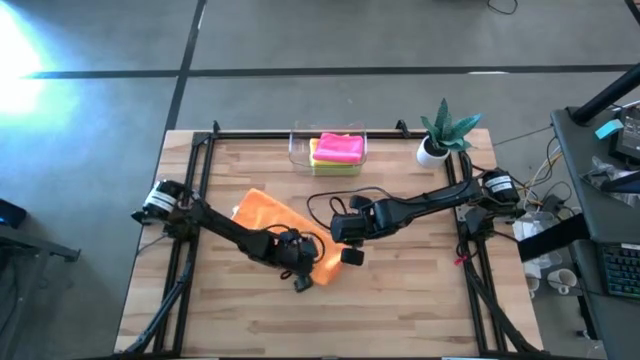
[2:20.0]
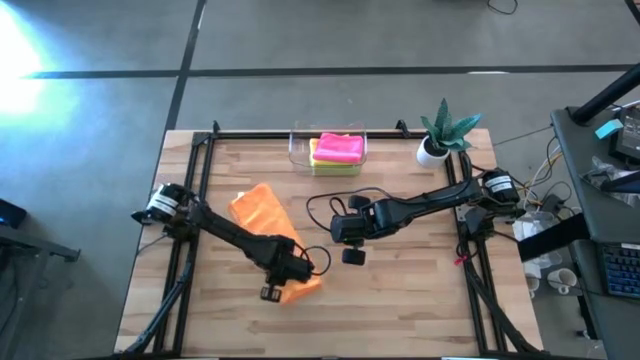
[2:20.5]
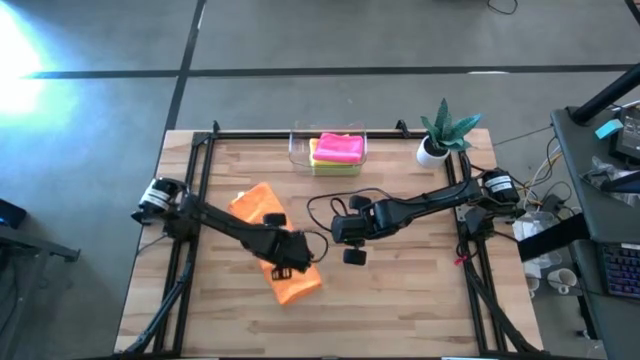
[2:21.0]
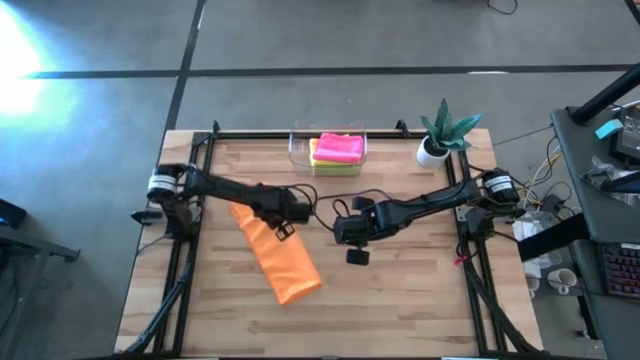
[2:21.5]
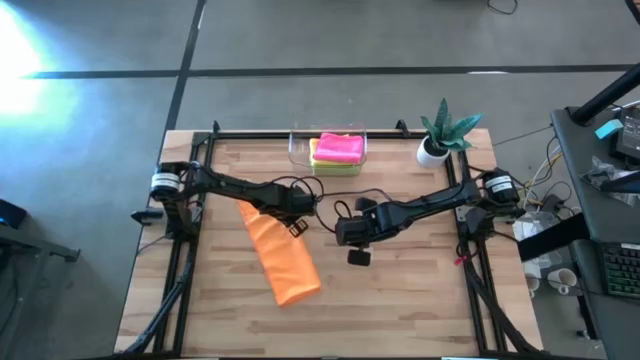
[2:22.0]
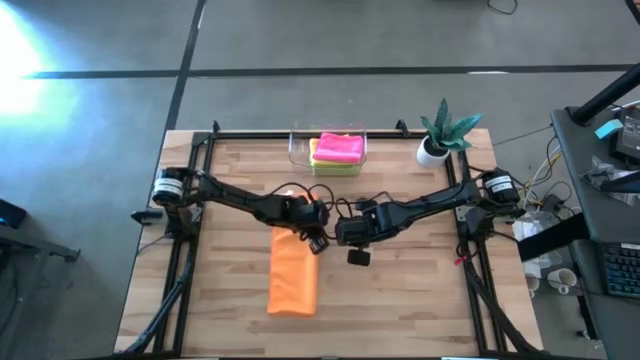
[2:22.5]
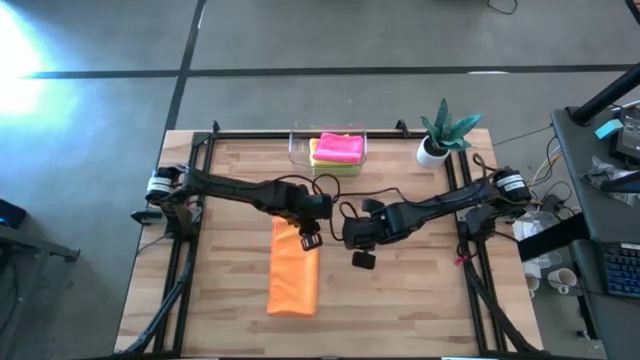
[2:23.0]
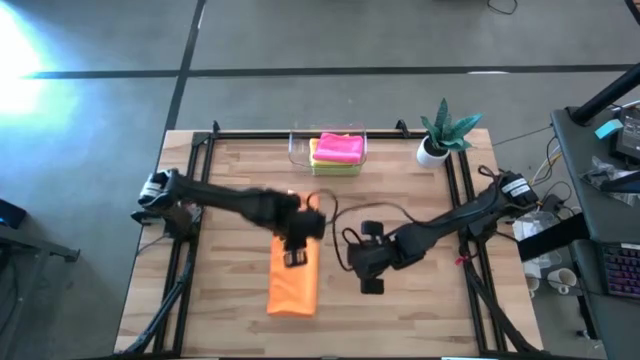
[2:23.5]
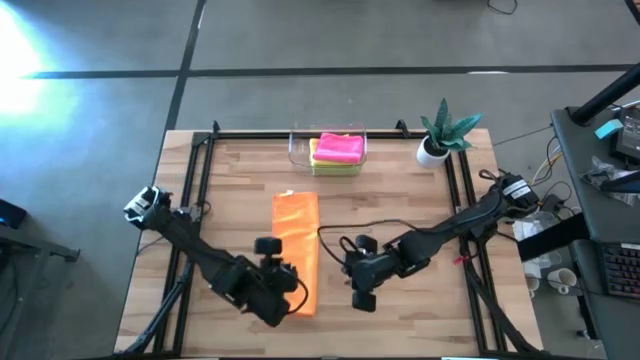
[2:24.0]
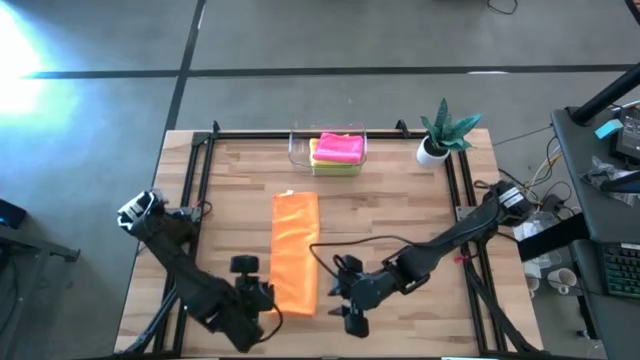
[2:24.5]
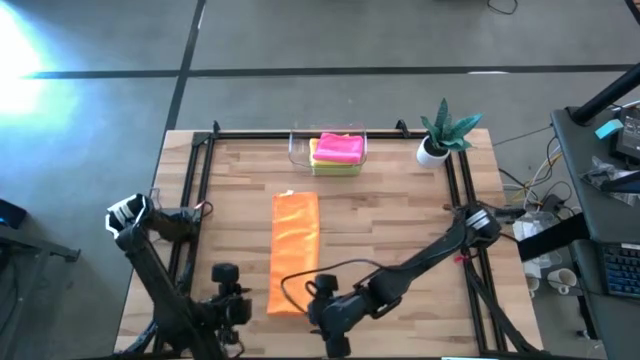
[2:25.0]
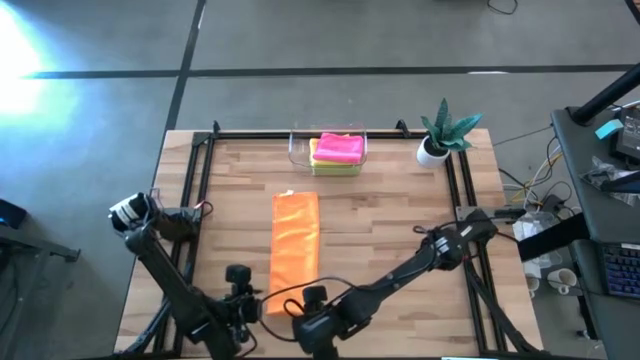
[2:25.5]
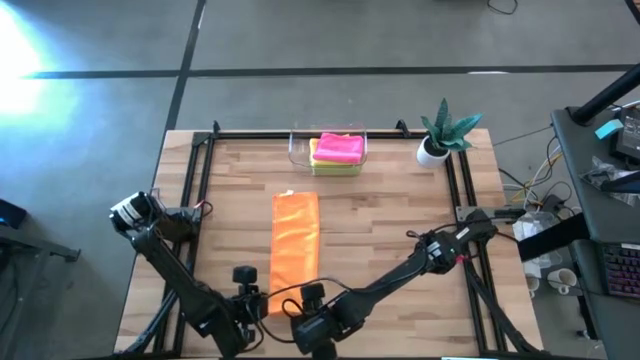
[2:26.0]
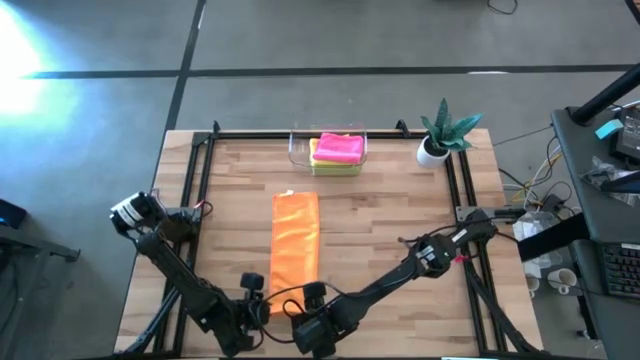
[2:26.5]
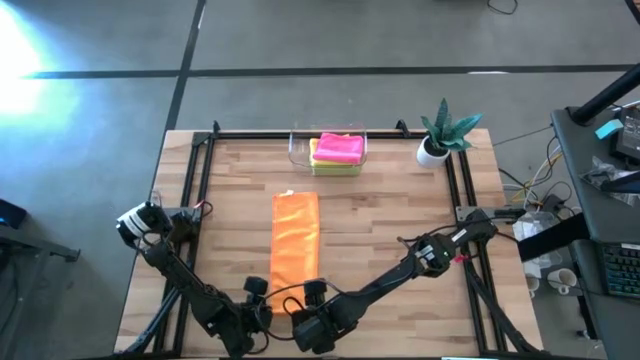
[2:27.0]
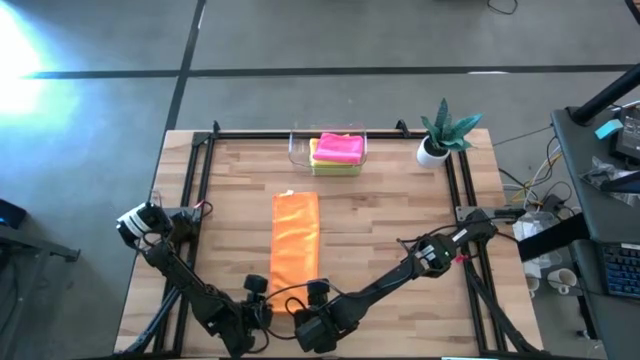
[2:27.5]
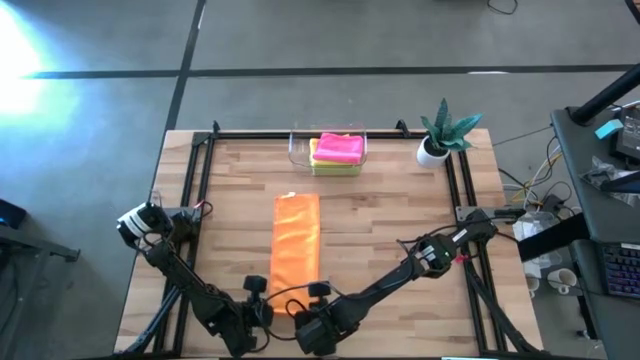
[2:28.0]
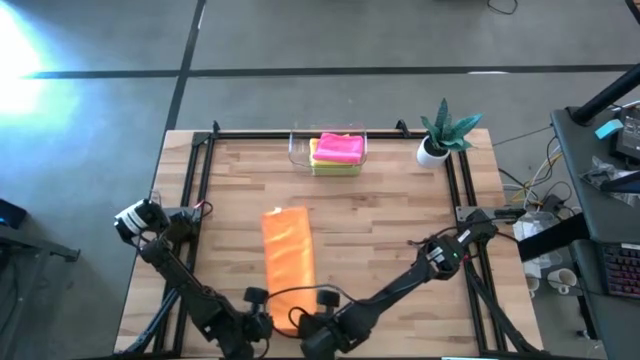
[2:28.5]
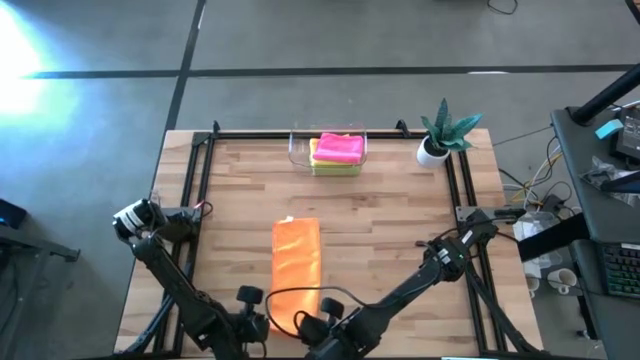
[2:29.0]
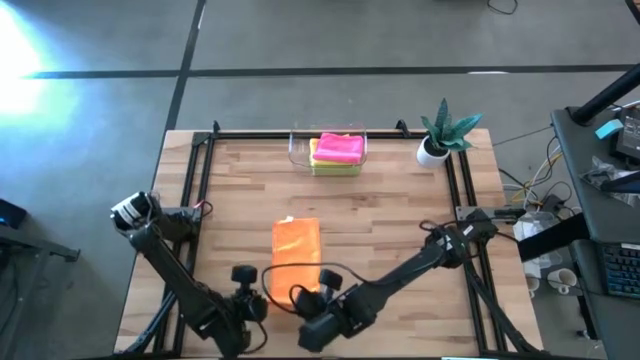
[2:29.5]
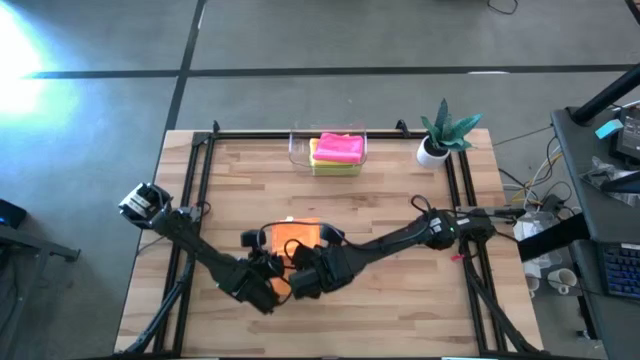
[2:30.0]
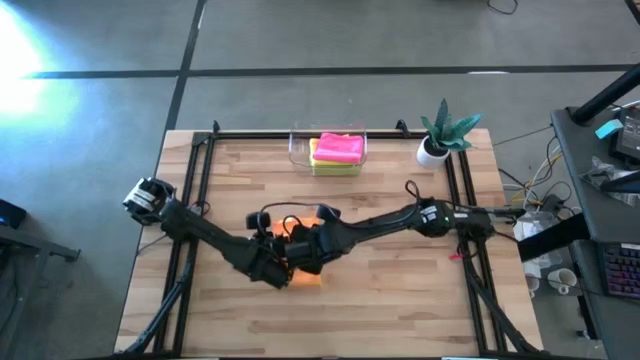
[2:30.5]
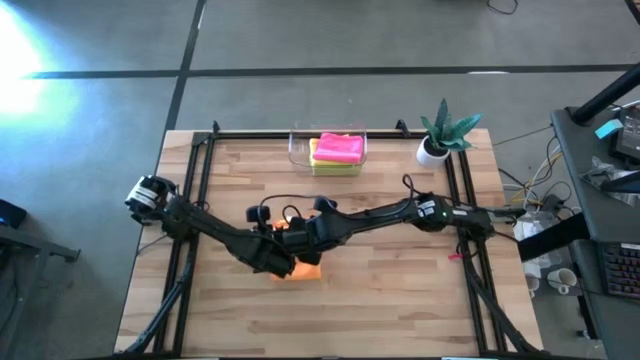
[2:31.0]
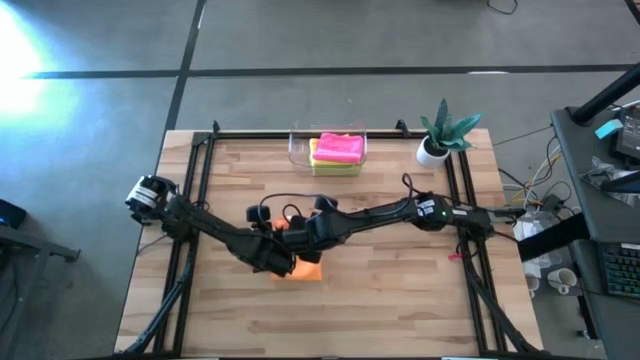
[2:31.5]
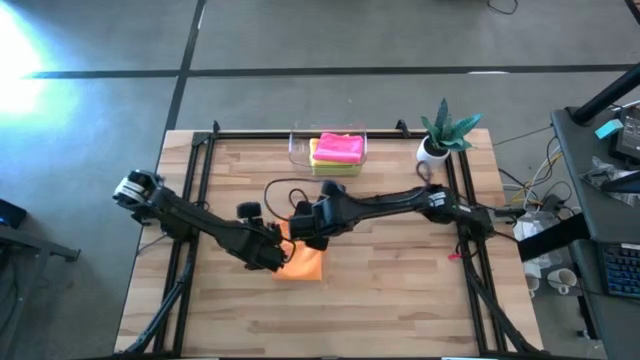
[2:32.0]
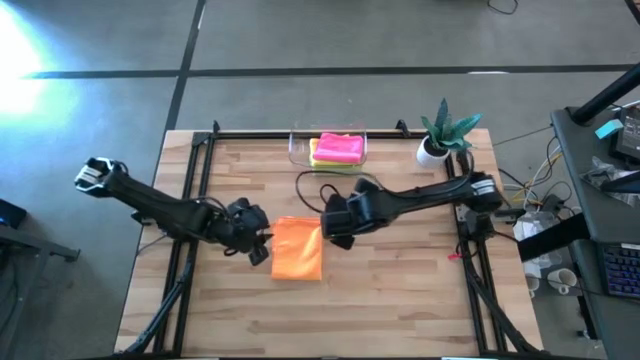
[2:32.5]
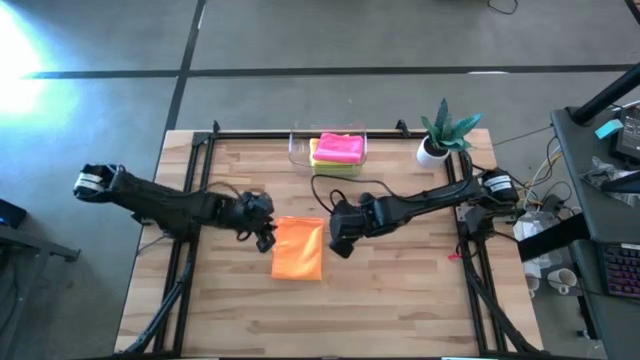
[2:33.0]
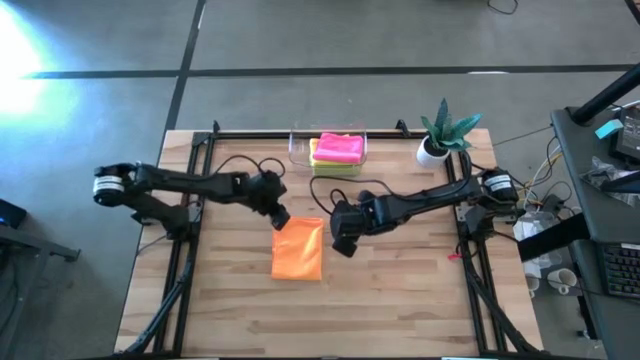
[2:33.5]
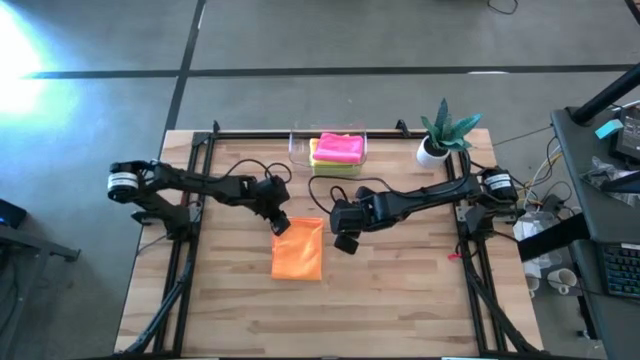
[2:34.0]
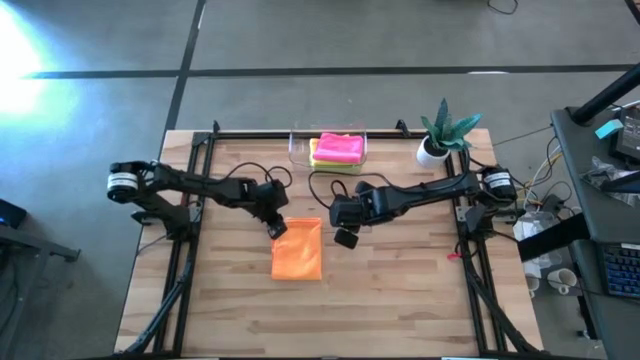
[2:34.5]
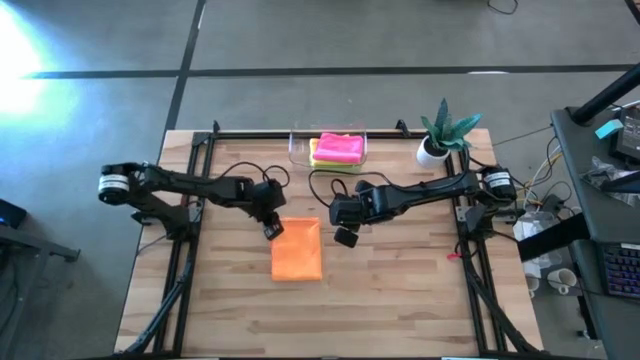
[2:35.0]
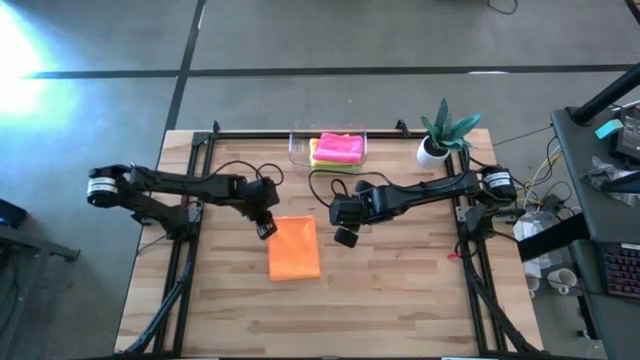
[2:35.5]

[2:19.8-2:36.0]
Task: Fold microfiber towels
Fold the orange towel on the table

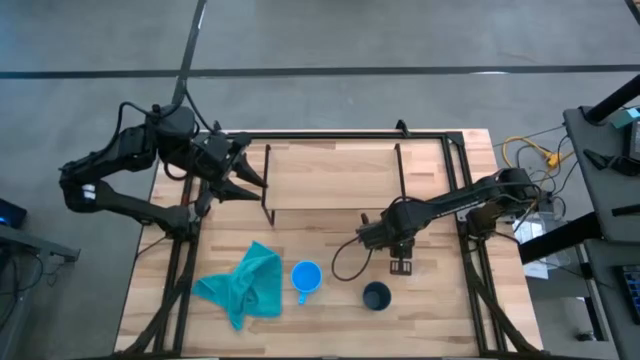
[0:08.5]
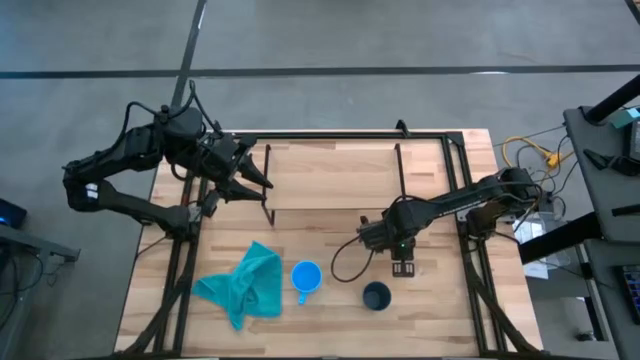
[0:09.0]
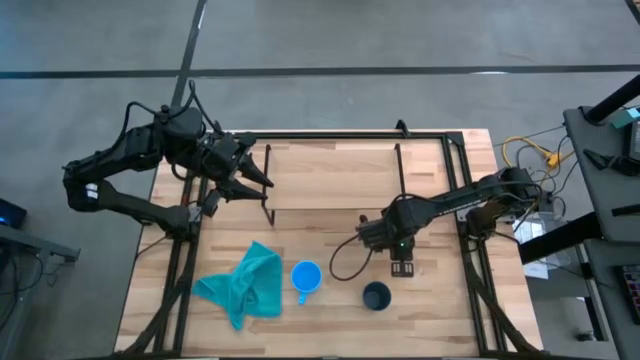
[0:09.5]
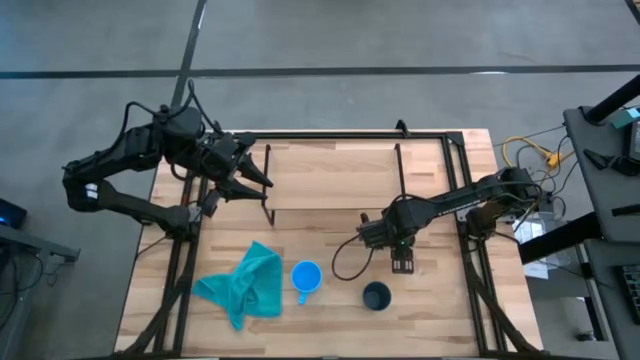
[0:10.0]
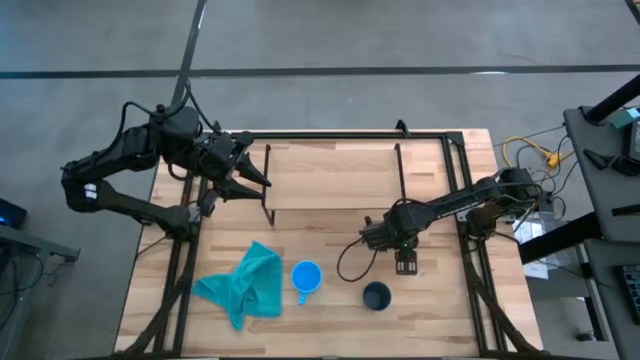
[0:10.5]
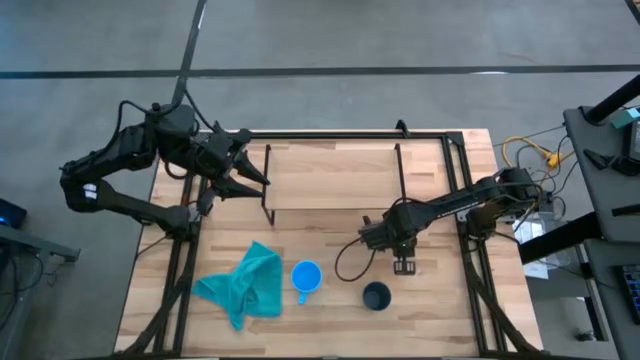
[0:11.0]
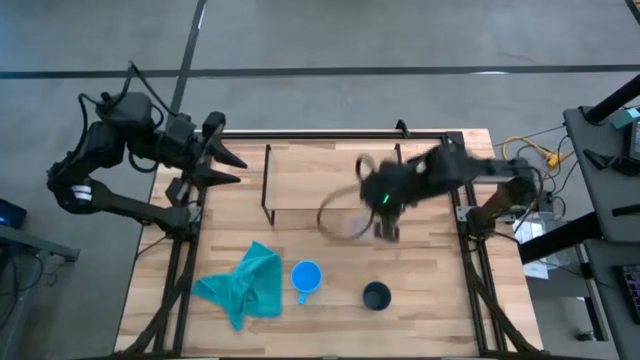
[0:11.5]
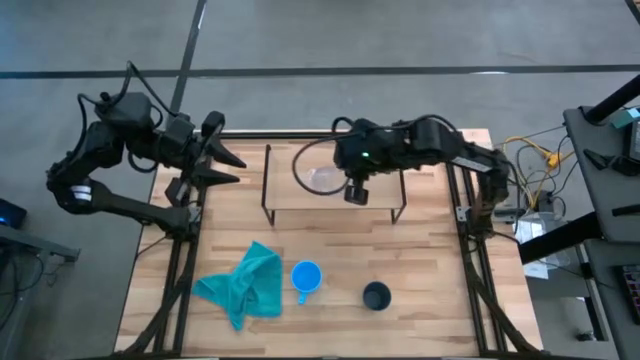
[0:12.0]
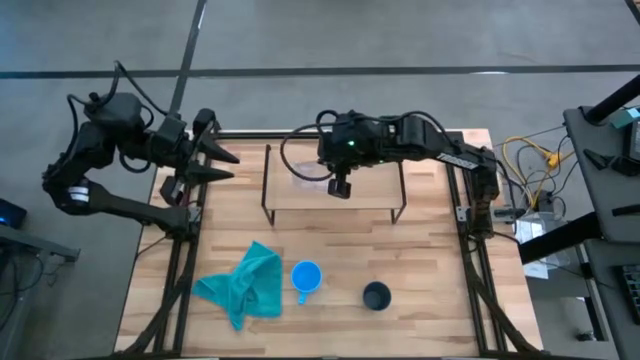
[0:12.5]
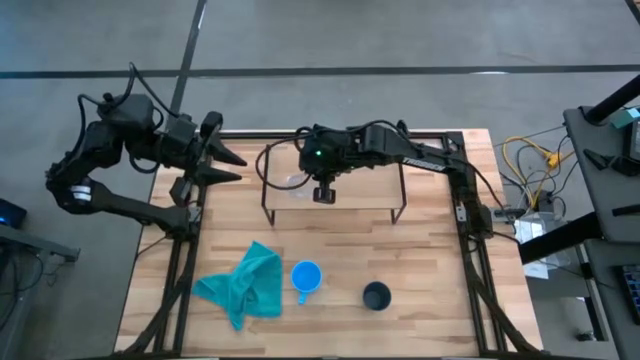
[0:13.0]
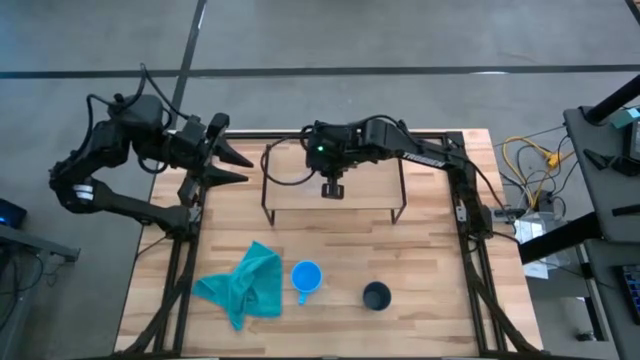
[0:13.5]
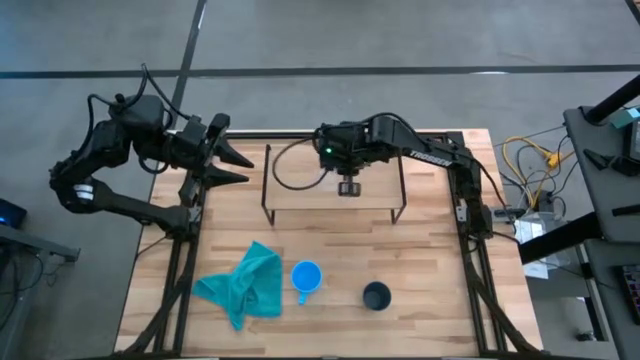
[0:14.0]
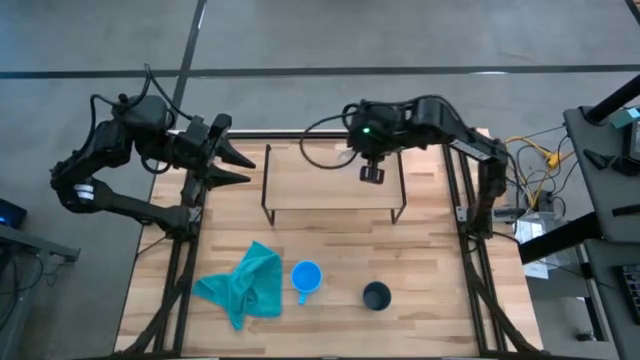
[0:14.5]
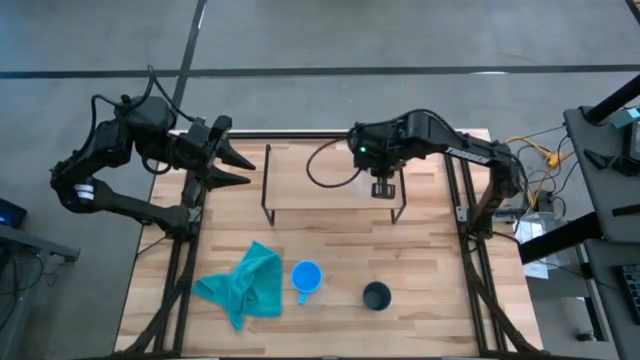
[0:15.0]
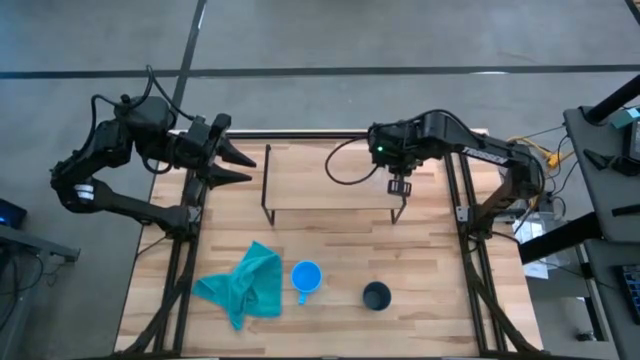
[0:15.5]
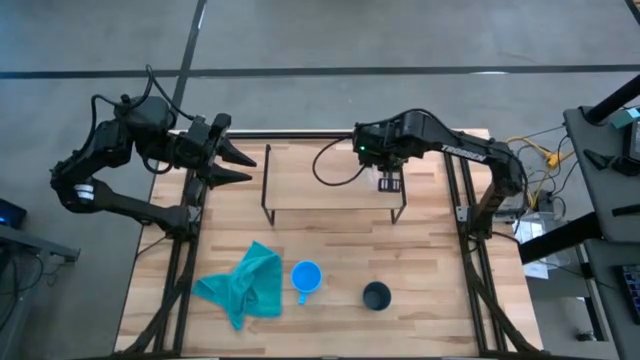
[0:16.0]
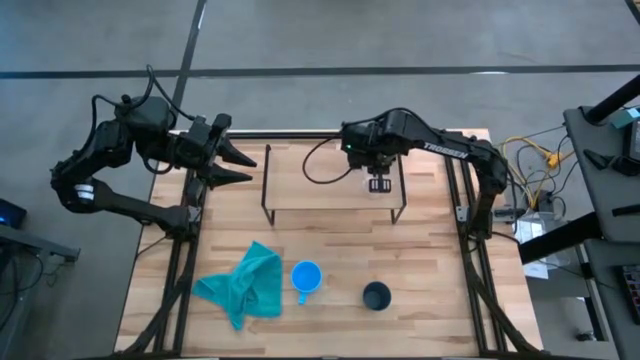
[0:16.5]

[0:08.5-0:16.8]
Task: Stack small to large cups/mugs on shelf
Put the transparent mug on the shelf
